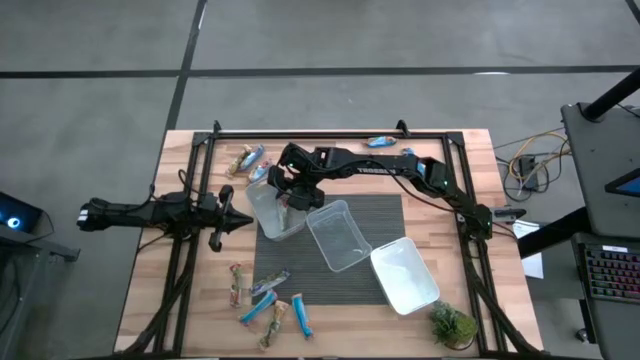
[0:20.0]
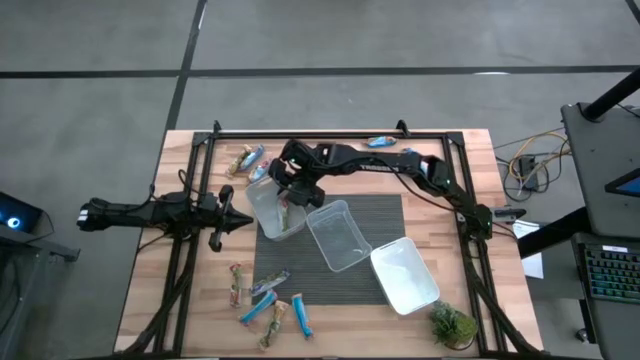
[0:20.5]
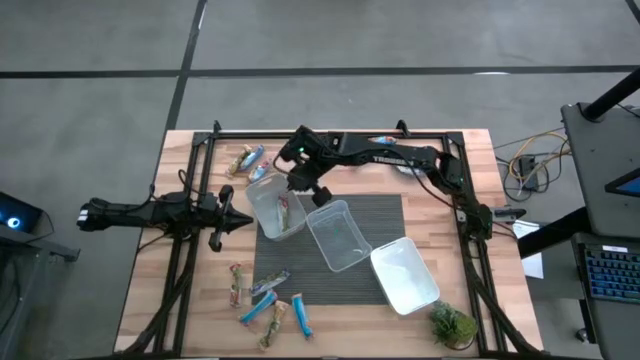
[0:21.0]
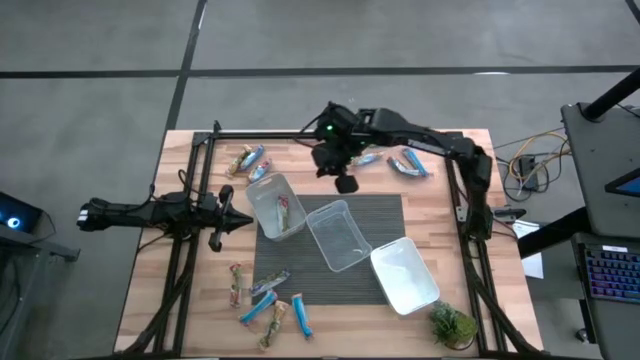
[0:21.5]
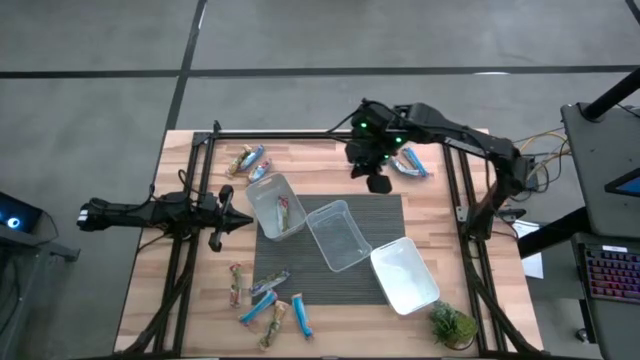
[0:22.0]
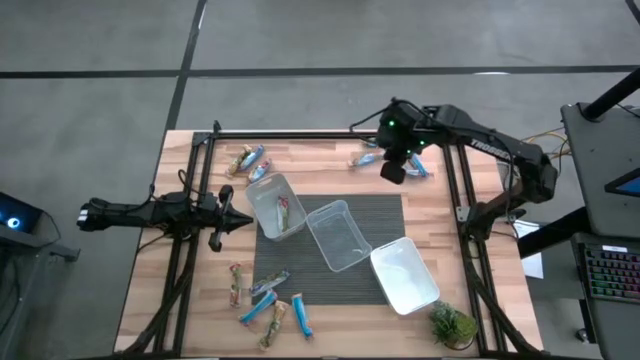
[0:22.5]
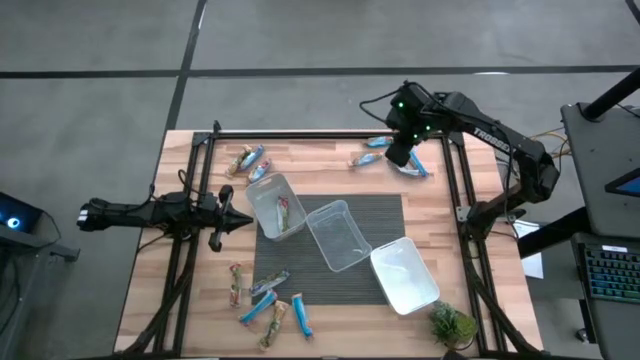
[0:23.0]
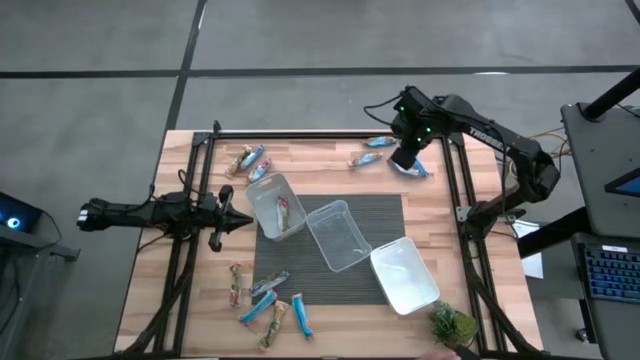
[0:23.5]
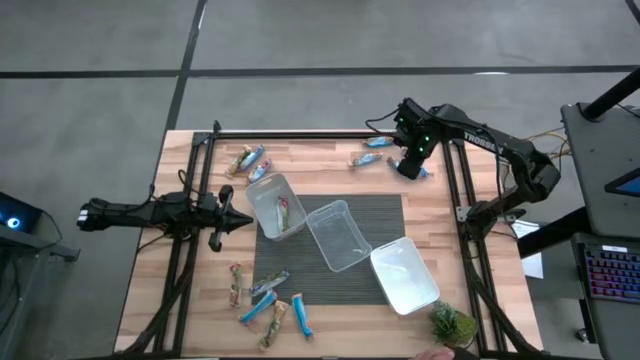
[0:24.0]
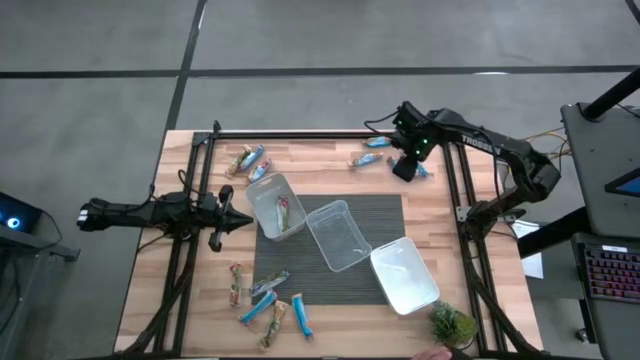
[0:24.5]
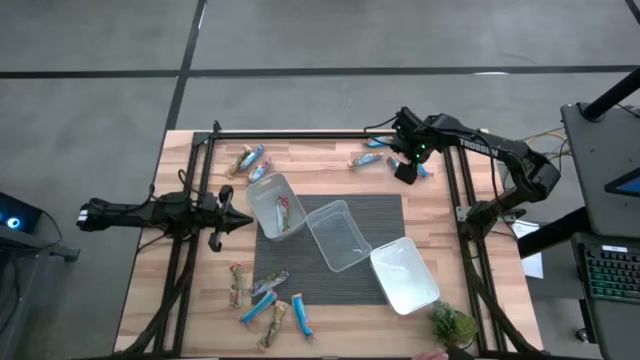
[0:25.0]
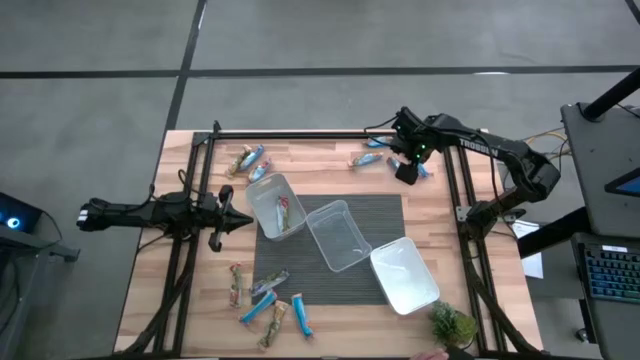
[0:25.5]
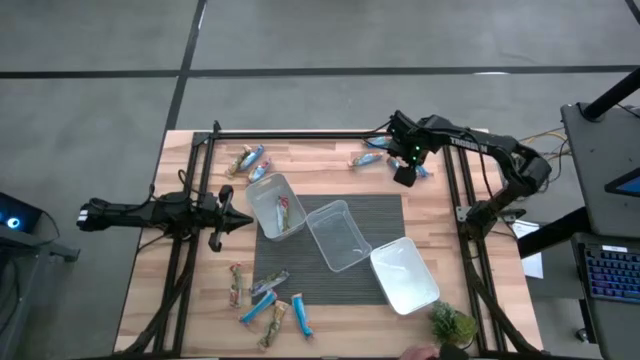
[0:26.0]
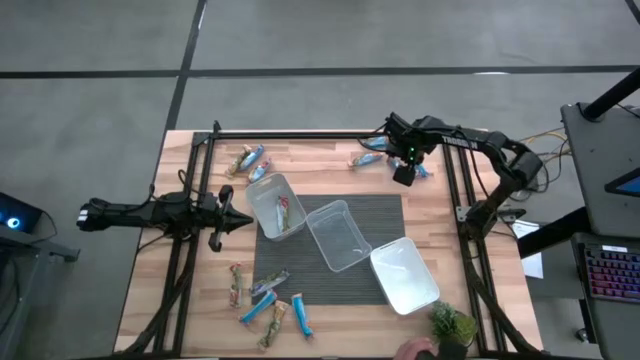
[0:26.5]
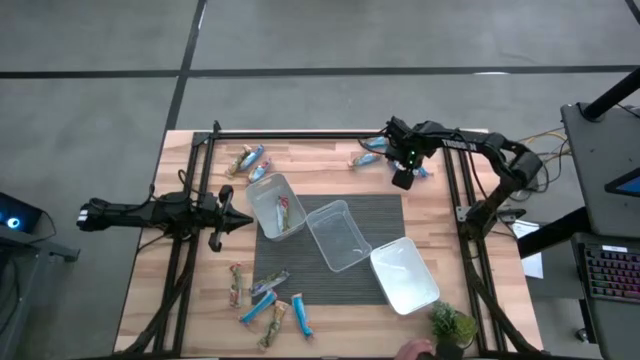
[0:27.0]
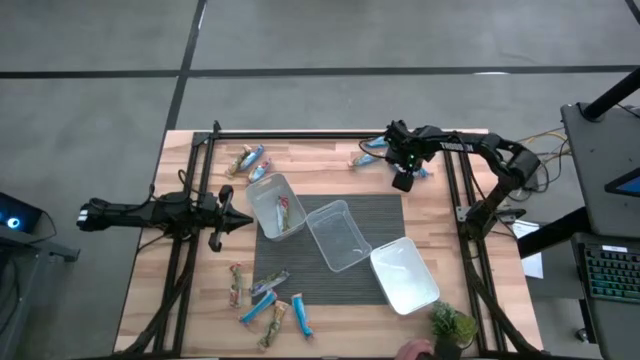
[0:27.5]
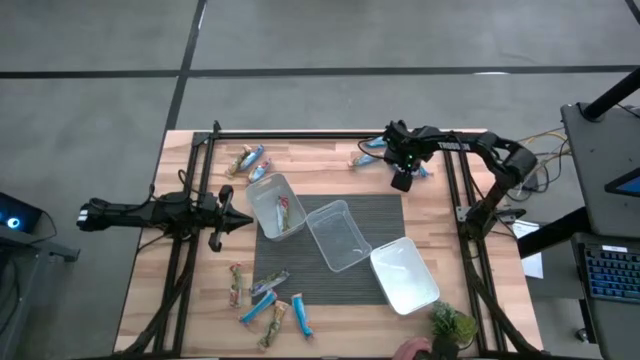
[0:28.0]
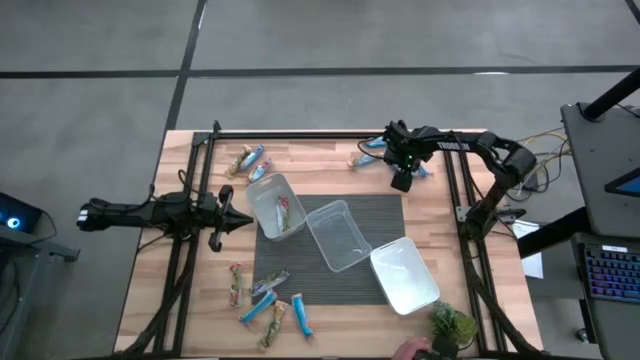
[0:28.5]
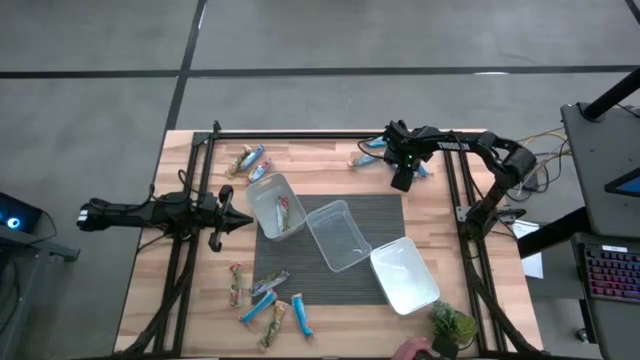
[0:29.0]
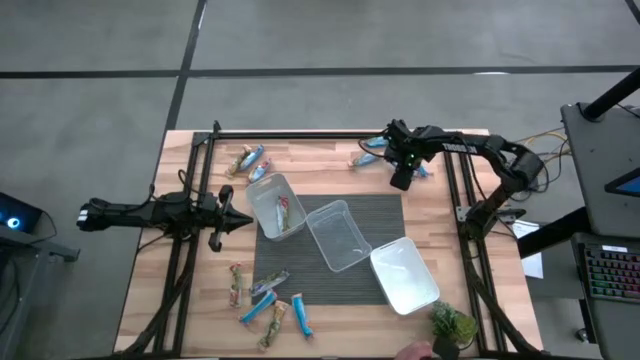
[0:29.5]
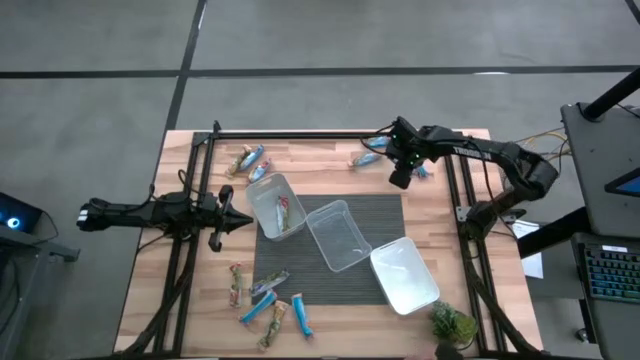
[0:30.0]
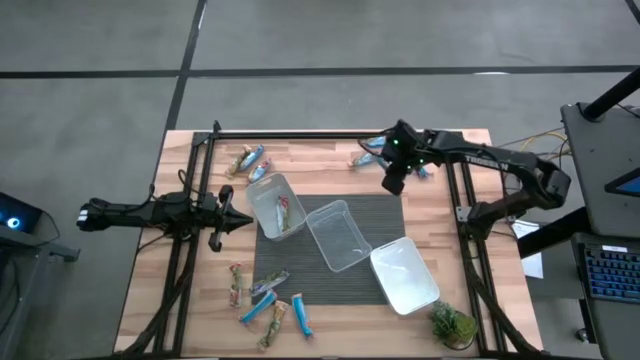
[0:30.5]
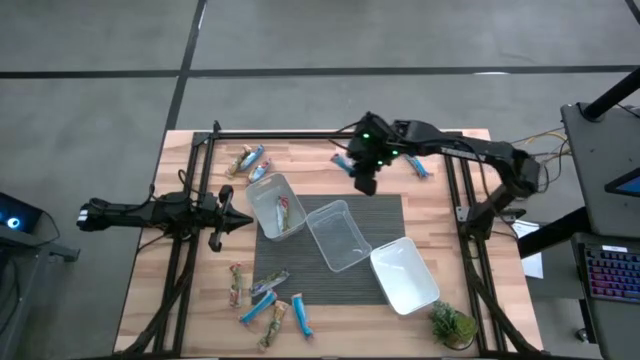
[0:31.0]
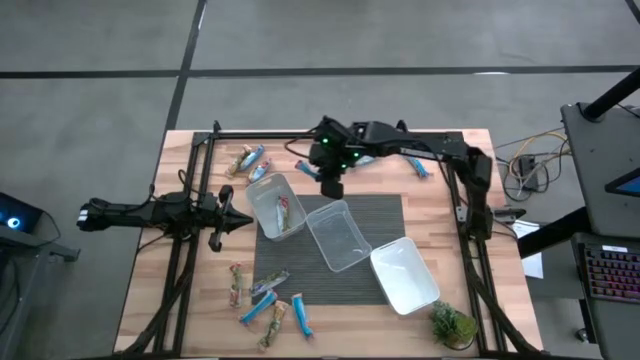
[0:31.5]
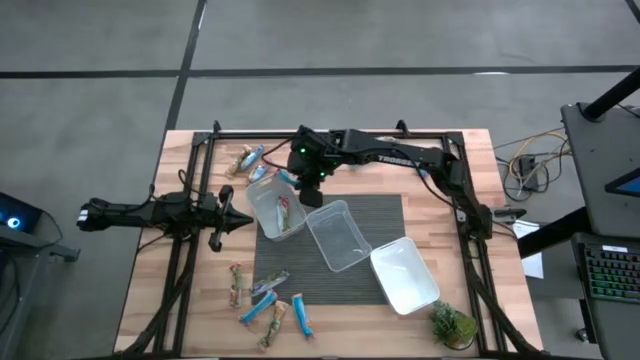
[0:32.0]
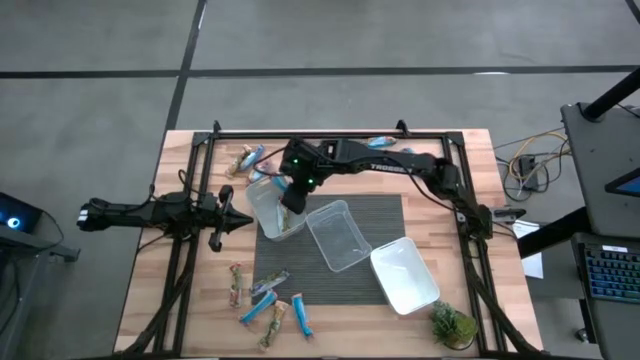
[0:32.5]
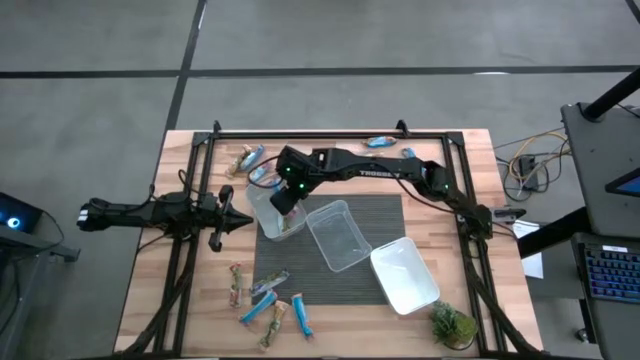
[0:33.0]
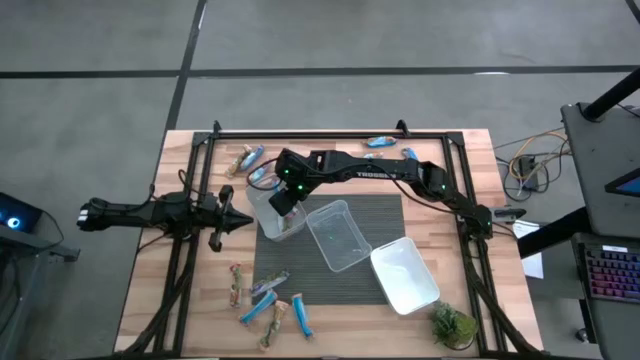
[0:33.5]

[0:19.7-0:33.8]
Task: Pick and place Granola Bars by type
Put the red granola bar into the gray bin

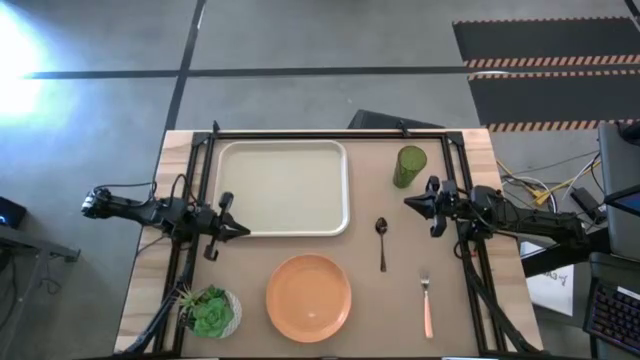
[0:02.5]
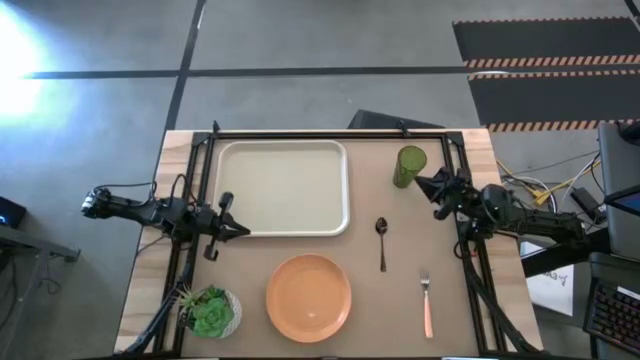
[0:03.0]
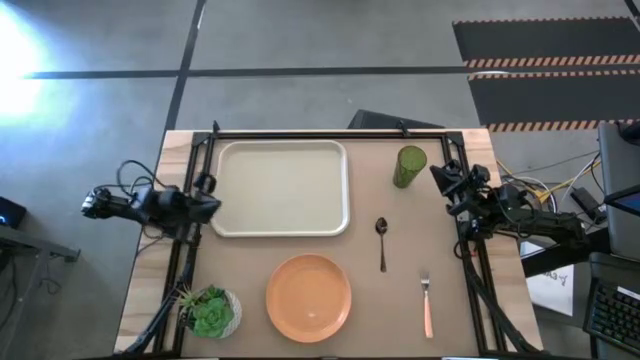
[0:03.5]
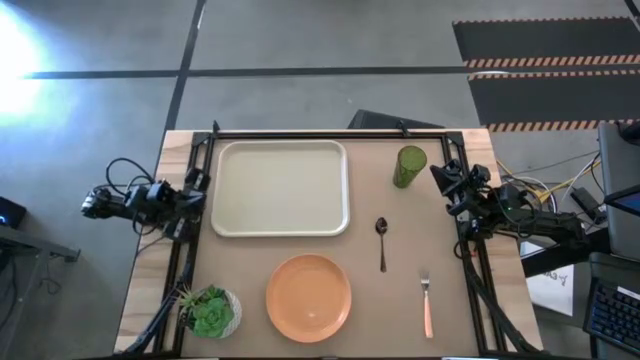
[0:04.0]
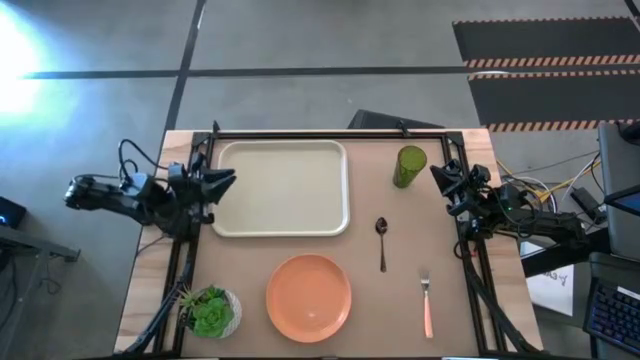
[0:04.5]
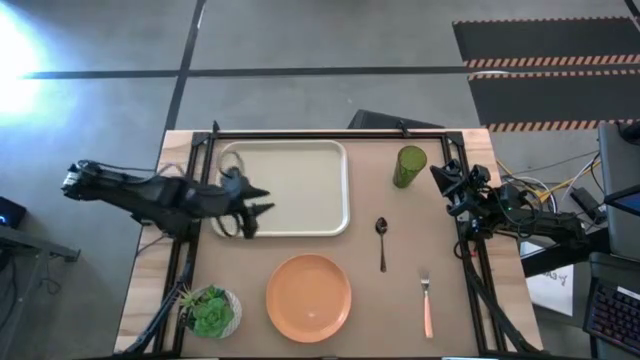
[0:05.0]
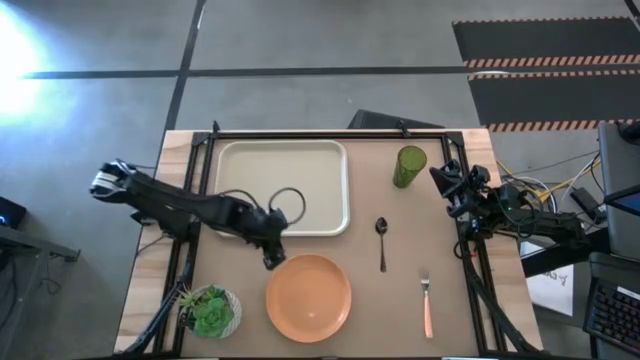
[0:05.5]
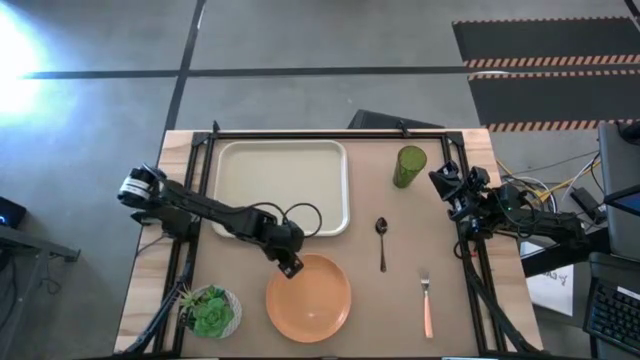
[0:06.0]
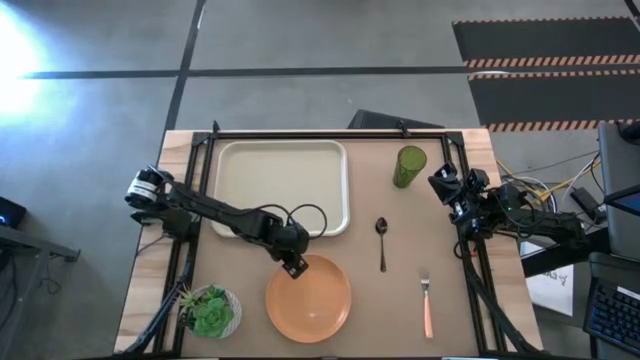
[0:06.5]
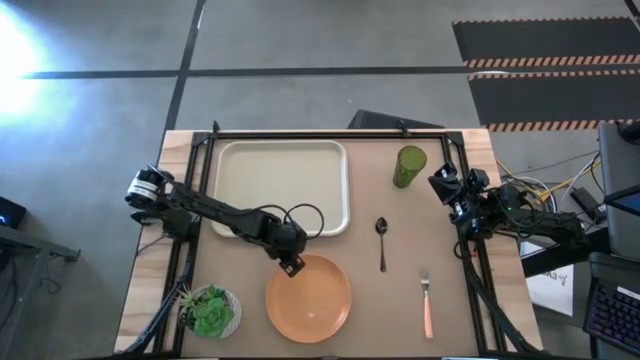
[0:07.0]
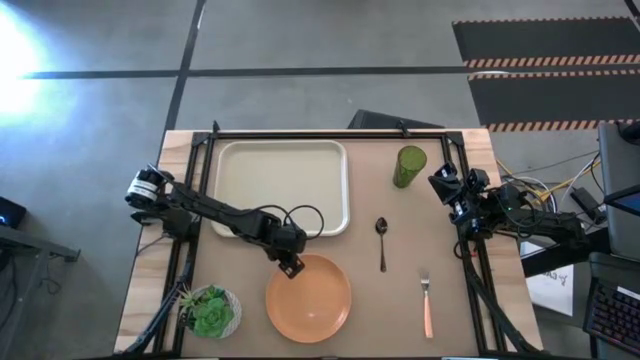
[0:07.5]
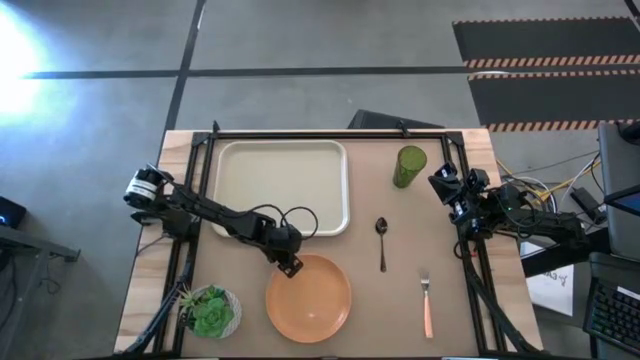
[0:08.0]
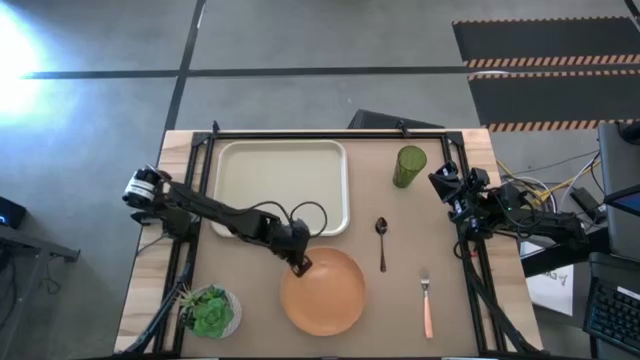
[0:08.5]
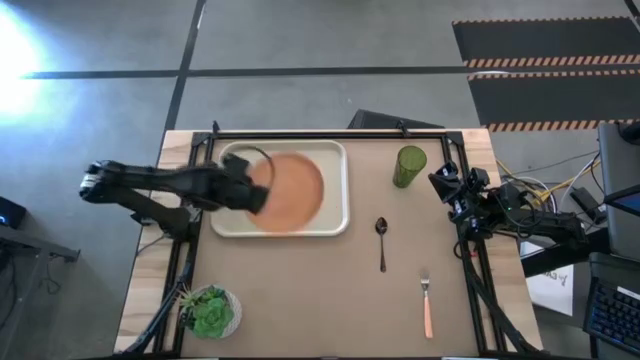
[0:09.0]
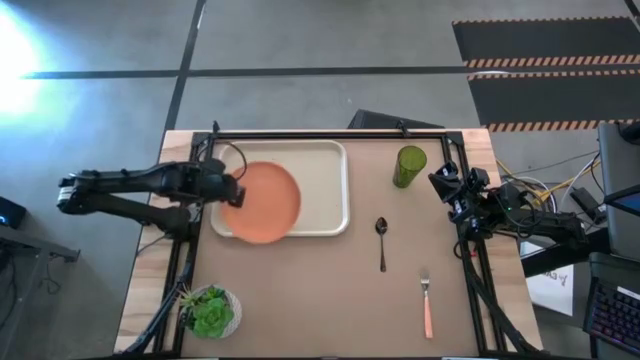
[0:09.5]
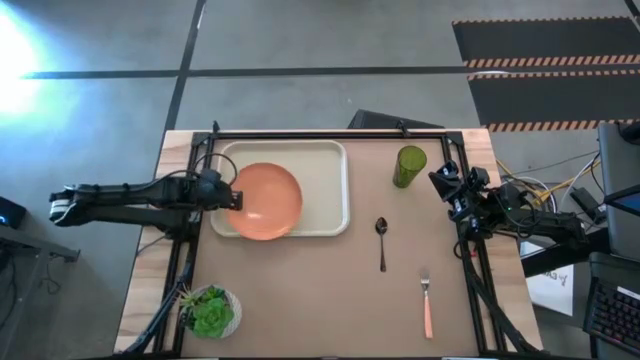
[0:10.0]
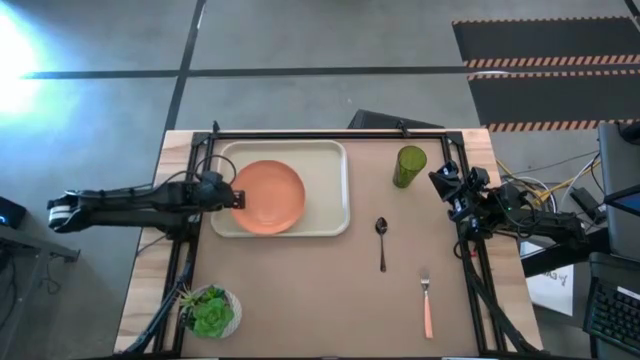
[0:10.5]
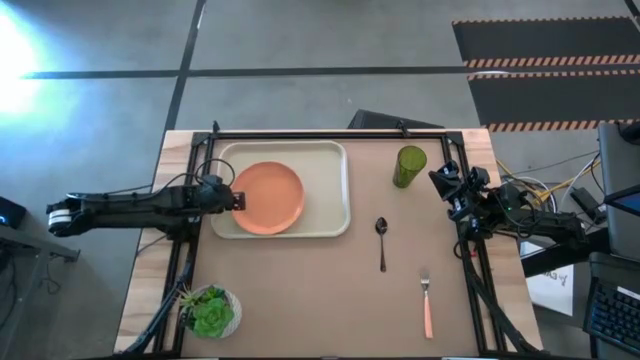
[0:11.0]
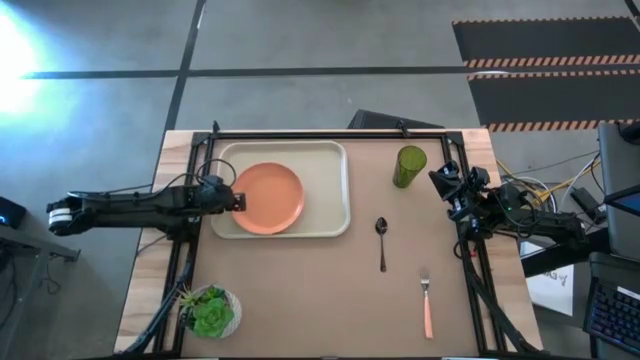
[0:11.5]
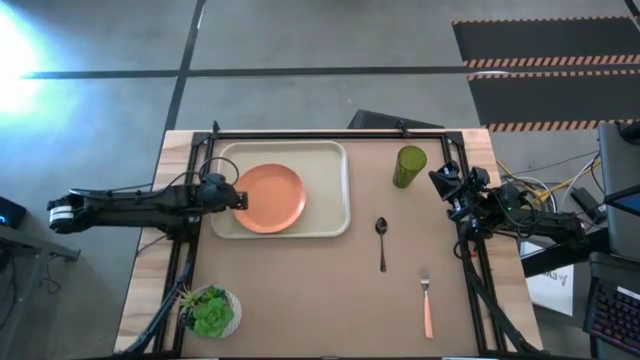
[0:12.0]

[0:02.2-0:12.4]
Task: Pick and place plate/cup/fork/spoon on tray
Put the orange plate on the bottom left of the white serving tray
